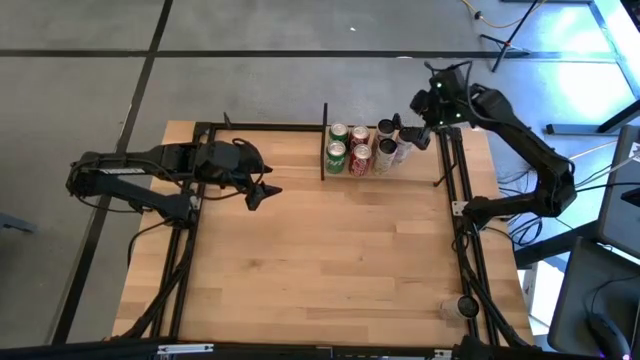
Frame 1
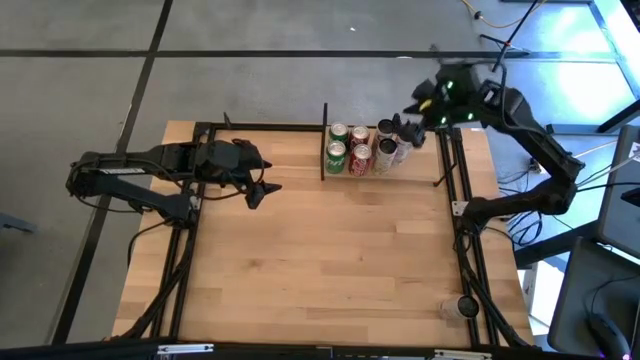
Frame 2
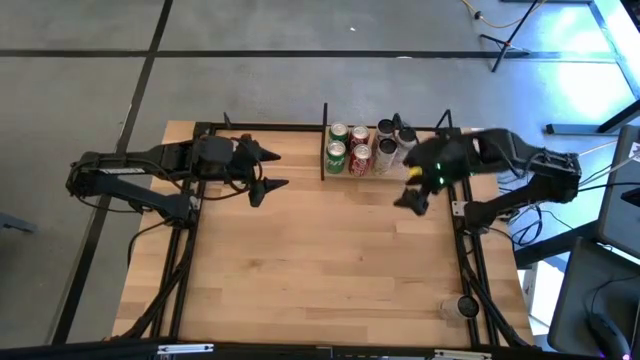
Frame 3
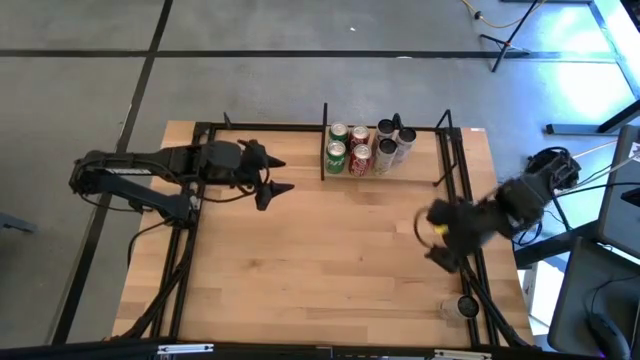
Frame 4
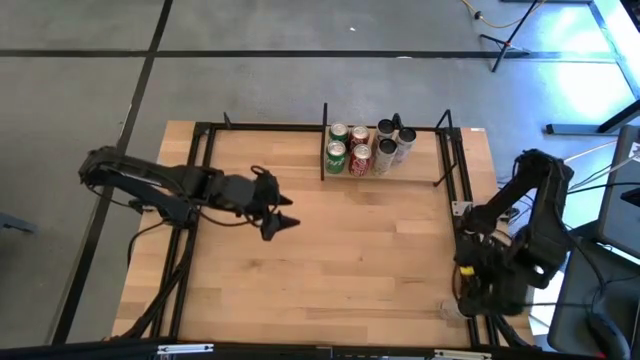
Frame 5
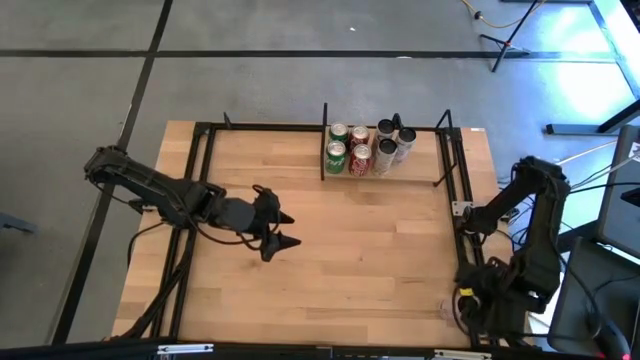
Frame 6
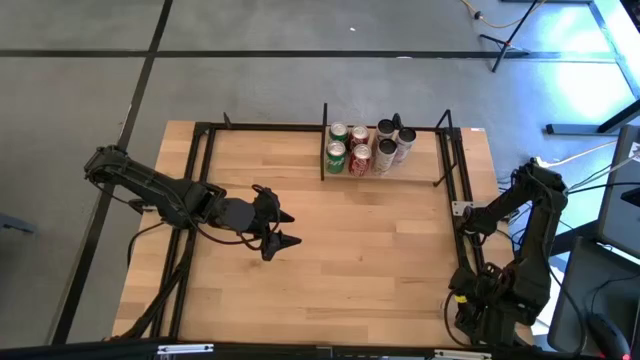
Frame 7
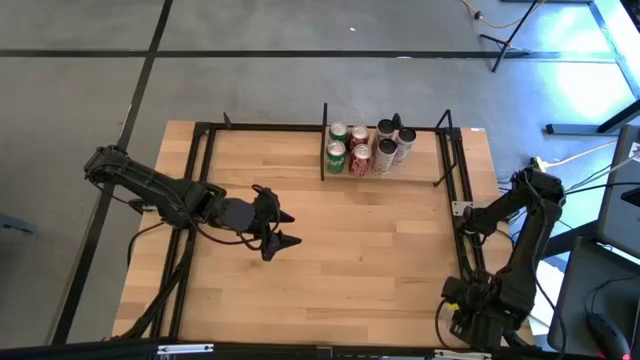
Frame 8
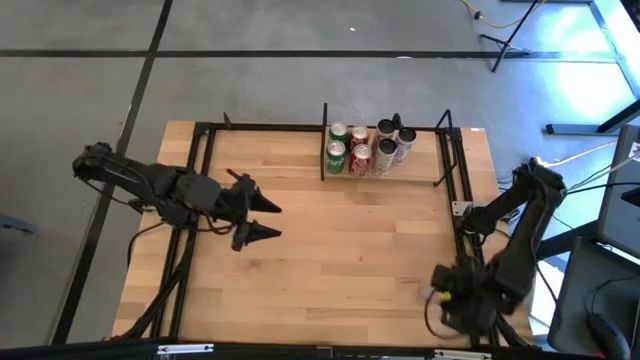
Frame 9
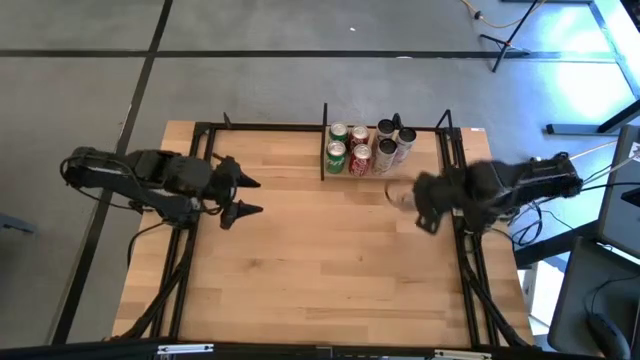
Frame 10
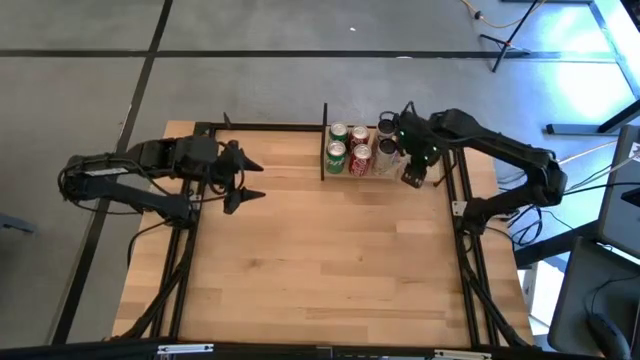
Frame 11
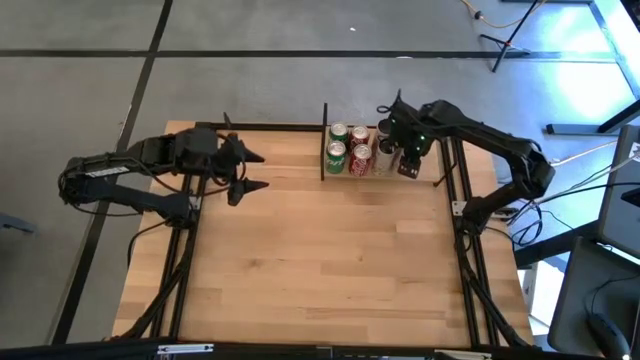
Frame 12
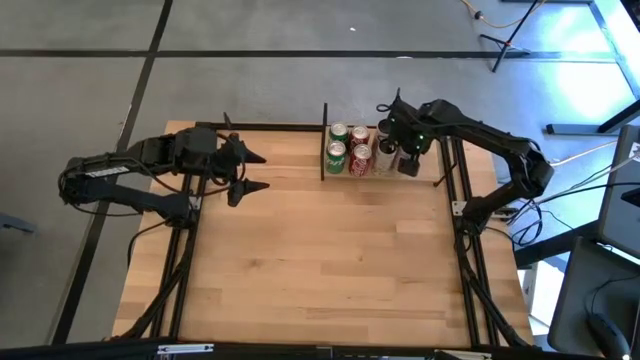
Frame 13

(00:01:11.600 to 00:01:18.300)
Task: Place canned beverage on shelf
Put the white pink soda can on the shelf aligned with the other white pink soda can

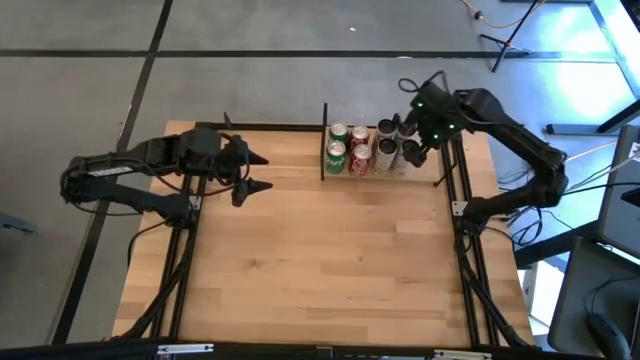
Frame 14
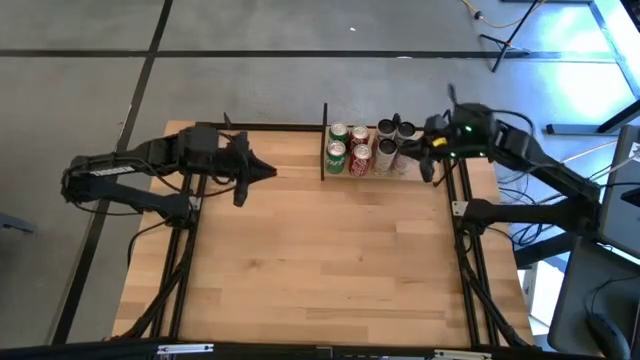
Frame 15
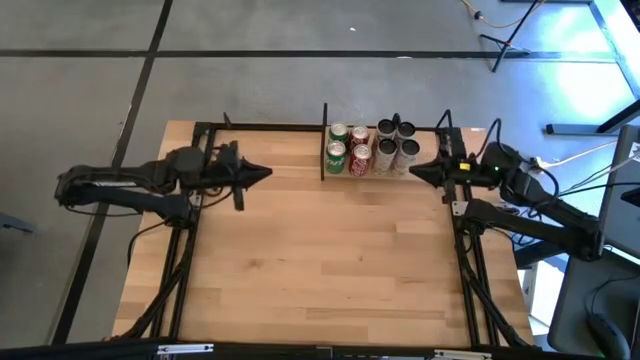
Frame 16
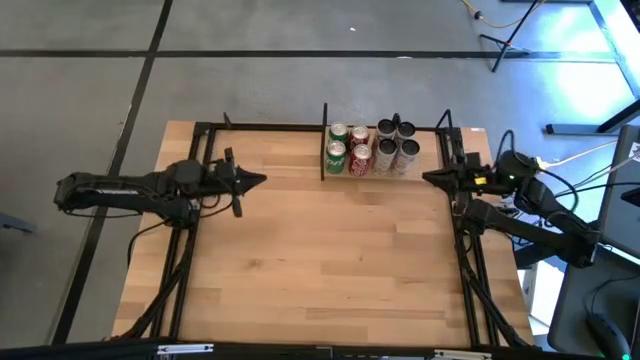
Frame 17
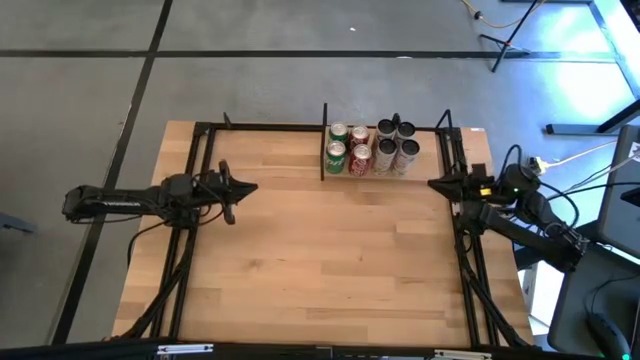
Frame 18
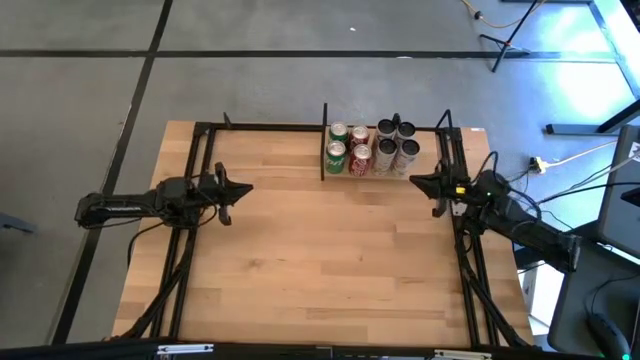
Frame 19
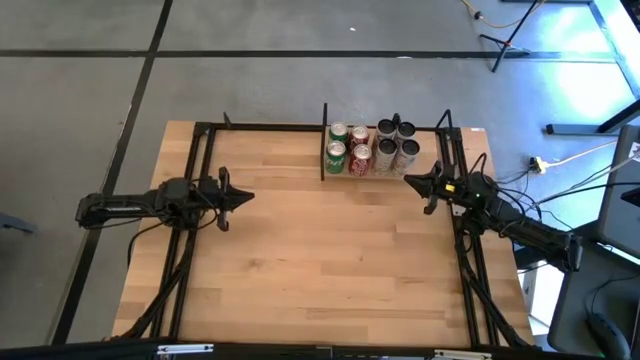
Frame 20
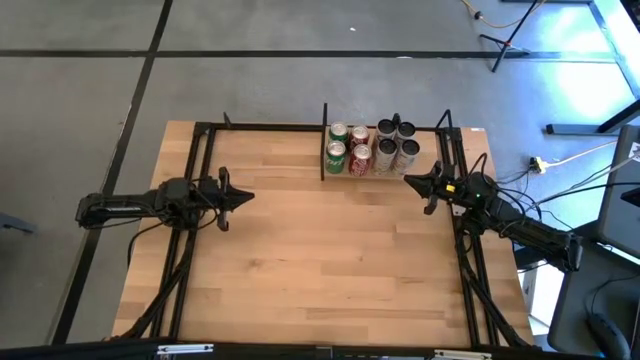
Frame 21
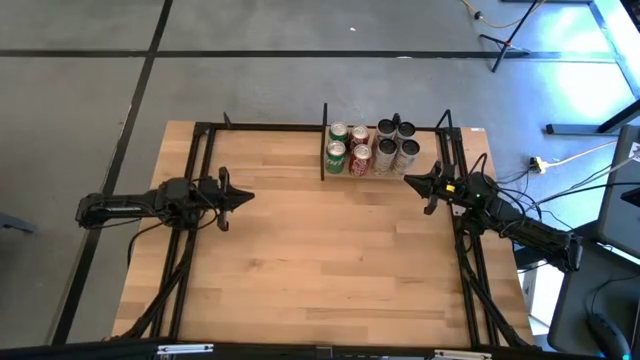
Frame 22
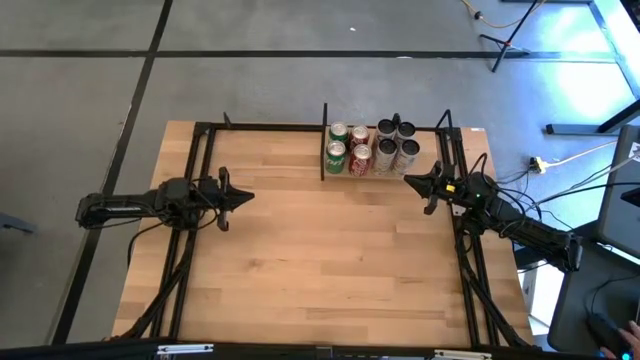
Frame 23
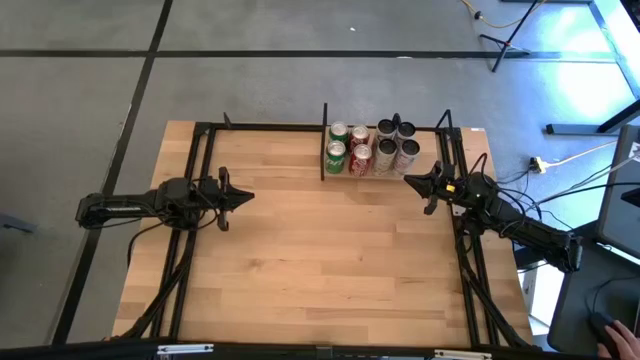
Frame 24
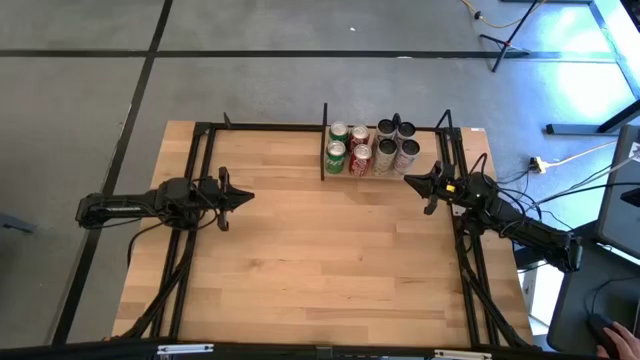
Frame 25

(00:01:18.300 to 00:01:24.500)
Return to Home Position

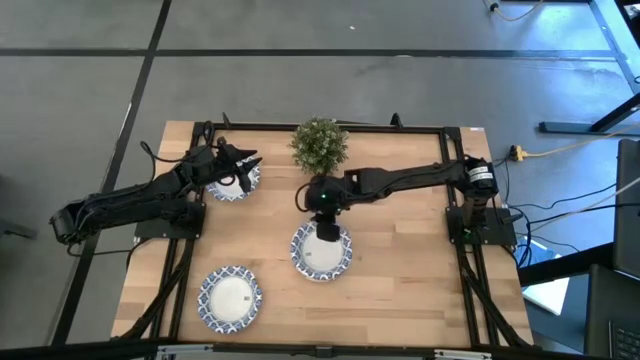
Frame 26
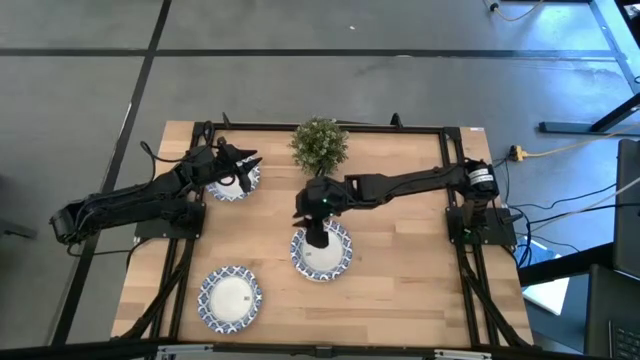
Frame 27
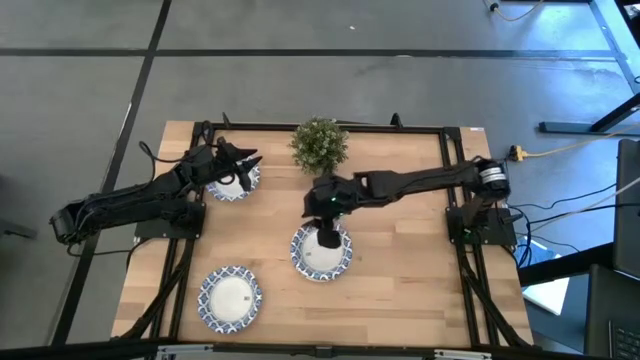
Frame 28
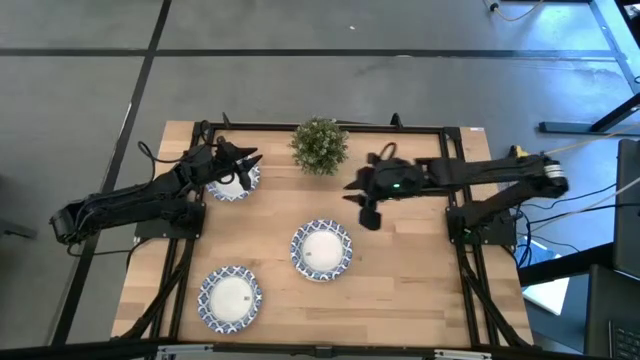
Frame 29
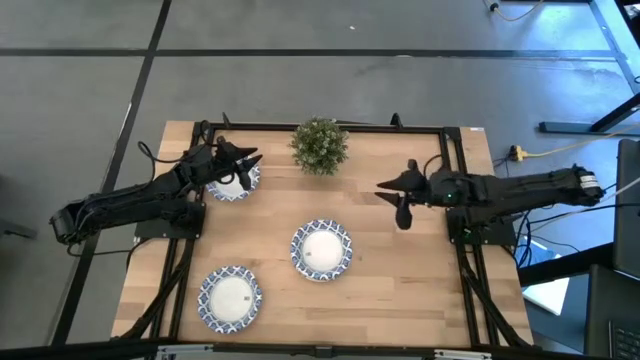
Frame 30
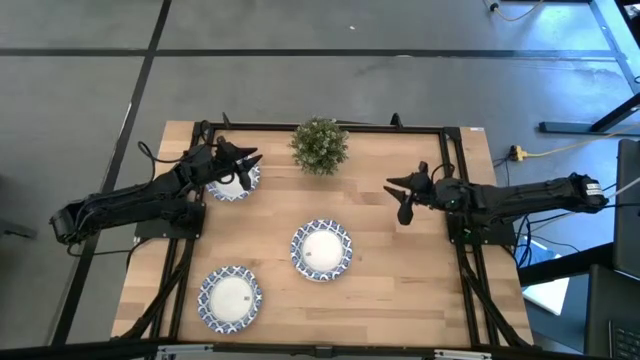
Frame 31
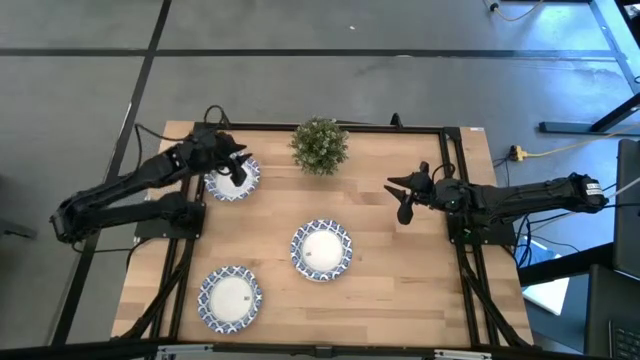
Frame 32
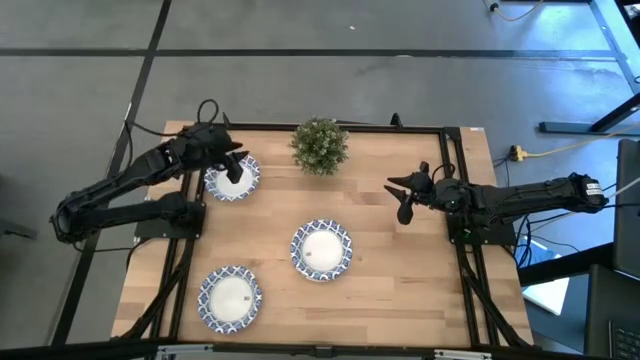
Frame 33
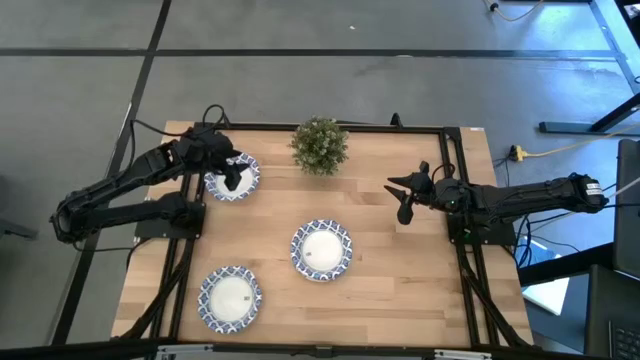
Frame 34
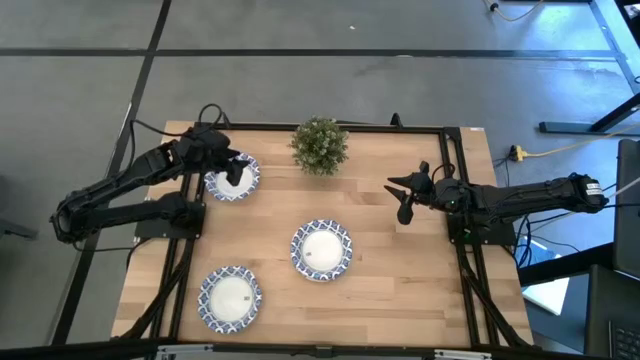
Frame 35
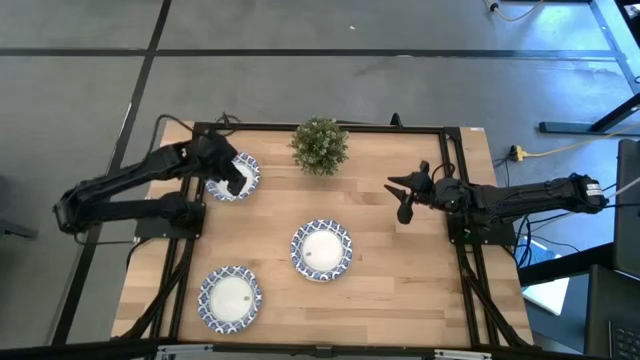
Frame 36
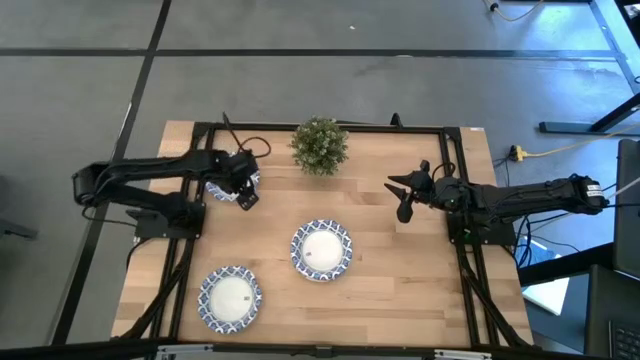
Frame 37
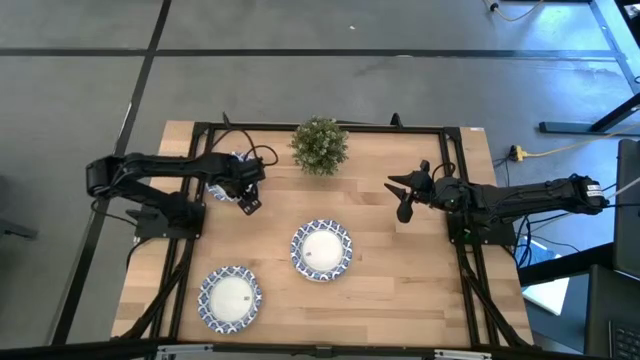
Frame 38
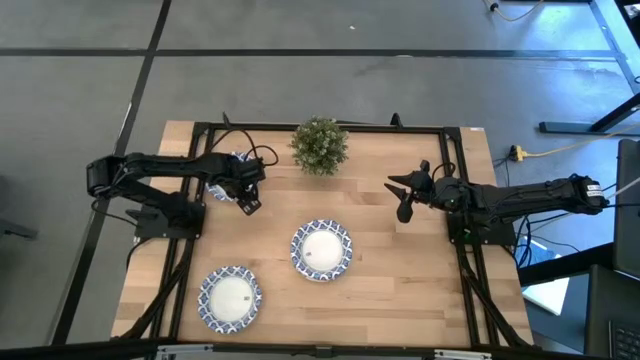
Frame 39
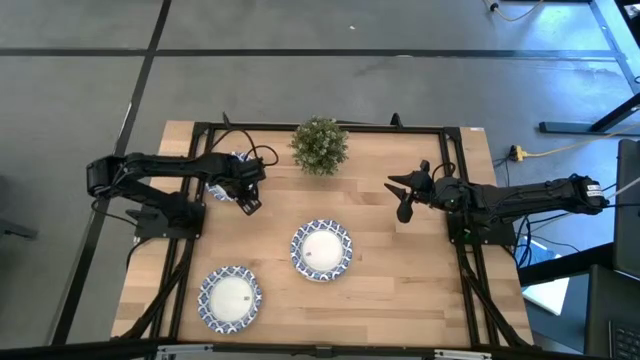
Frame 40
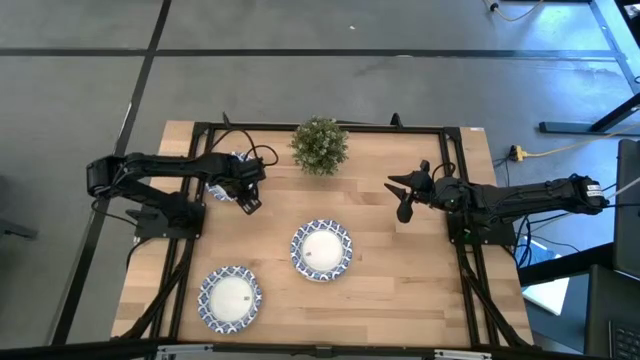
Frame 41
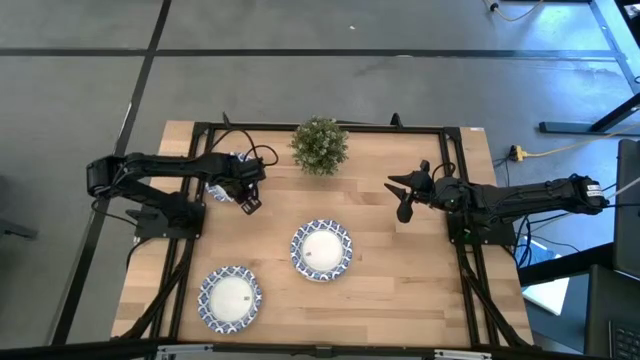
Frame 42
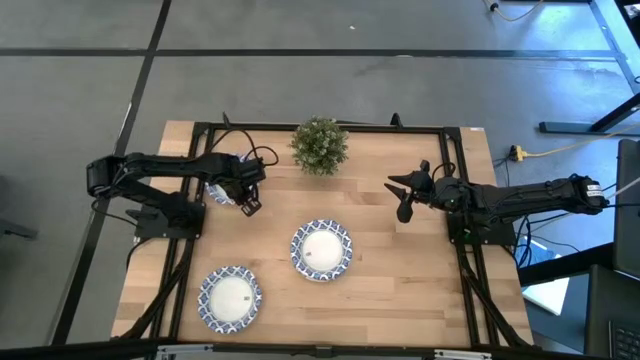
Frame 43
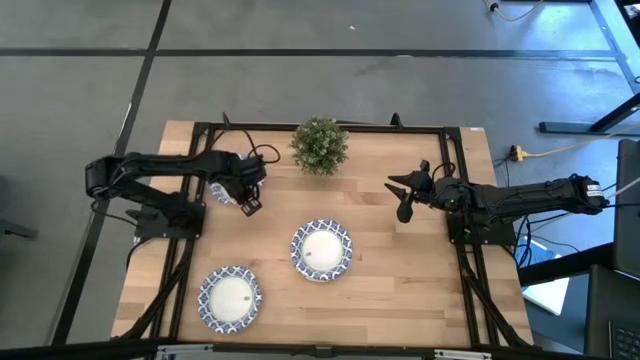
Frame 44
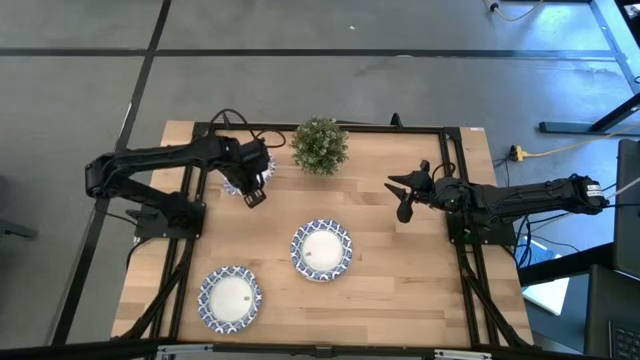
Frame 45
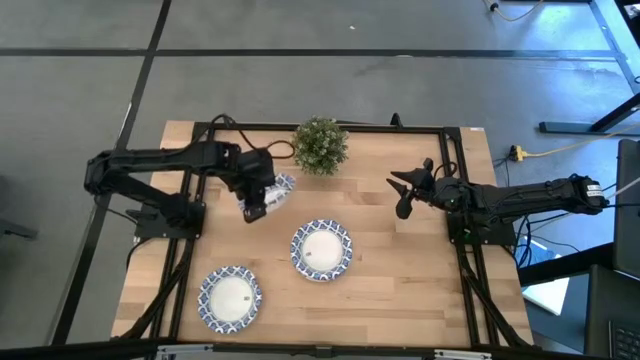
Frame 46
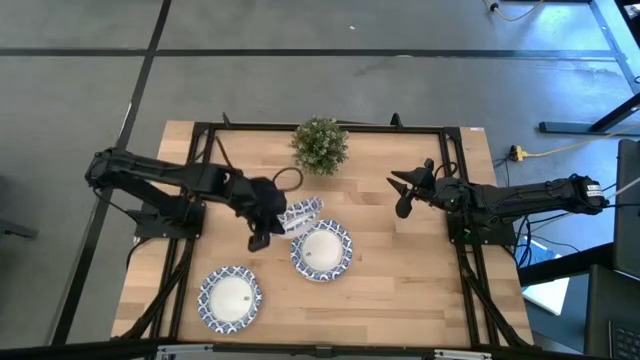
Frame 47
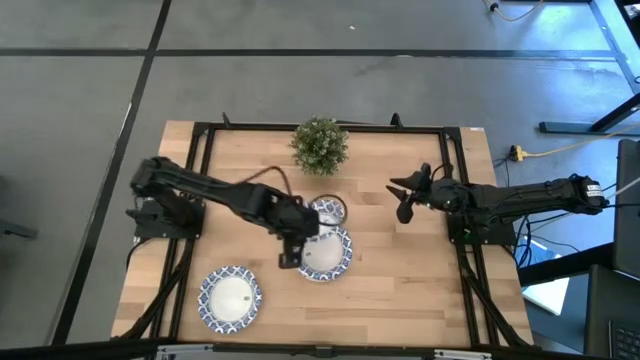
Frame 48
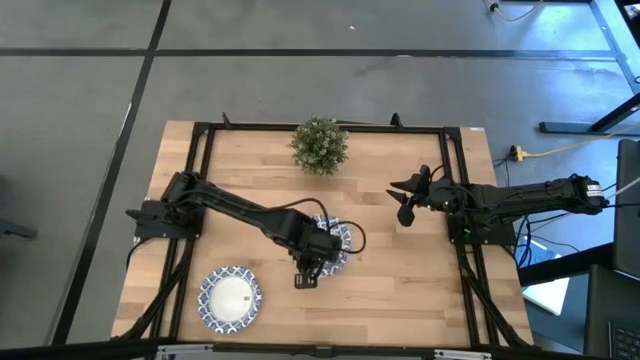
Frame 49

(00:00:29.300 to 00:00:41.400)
Task: Nest bowls inside each other
Stack the blue pattern bowl on the blue pattern bowl
